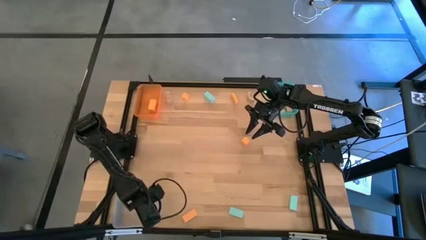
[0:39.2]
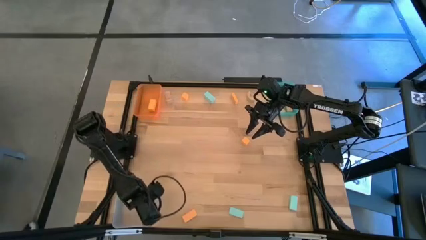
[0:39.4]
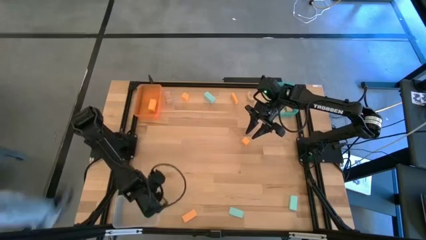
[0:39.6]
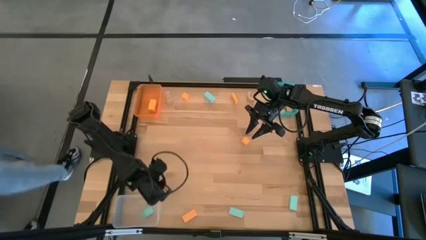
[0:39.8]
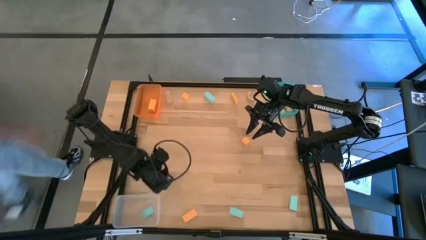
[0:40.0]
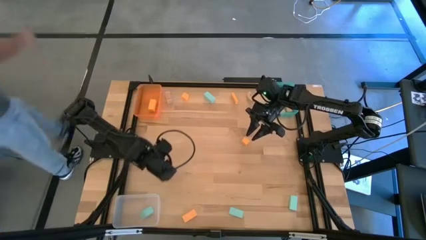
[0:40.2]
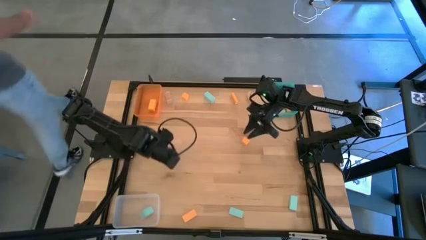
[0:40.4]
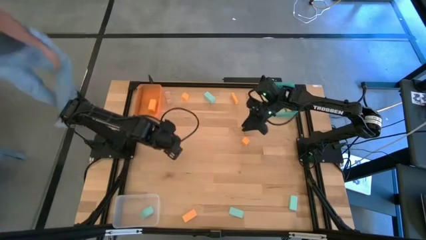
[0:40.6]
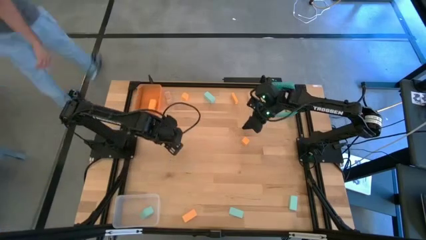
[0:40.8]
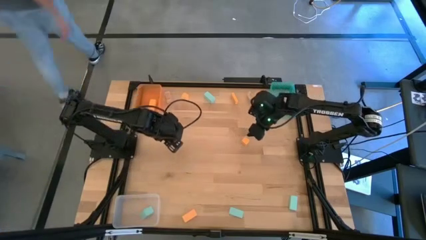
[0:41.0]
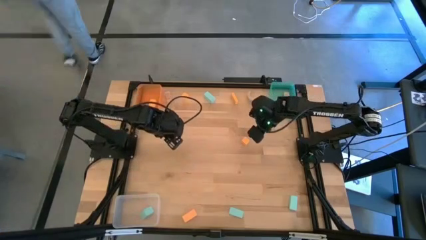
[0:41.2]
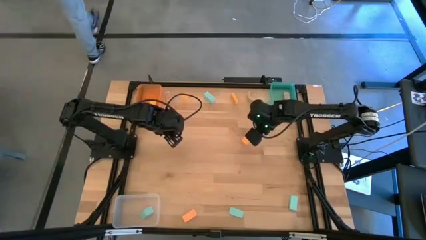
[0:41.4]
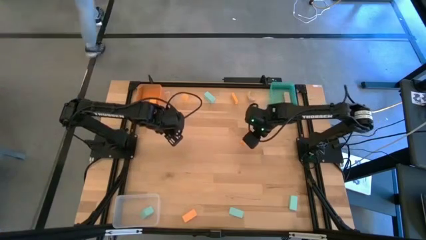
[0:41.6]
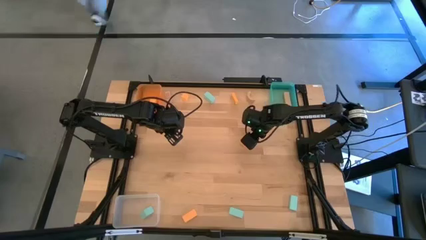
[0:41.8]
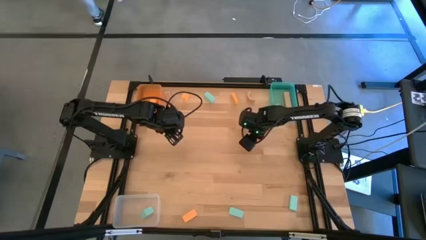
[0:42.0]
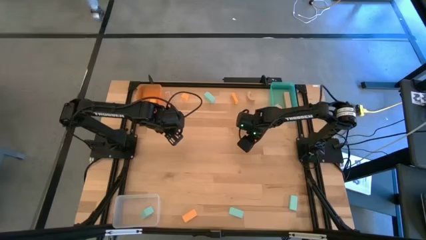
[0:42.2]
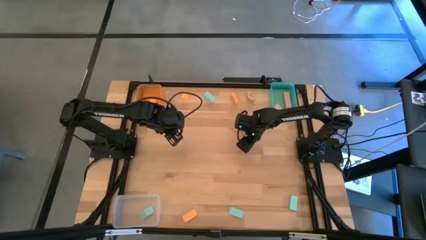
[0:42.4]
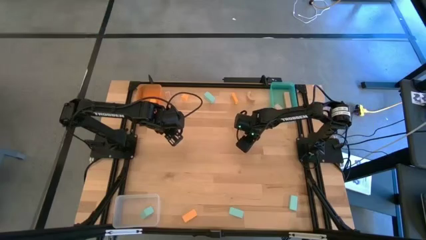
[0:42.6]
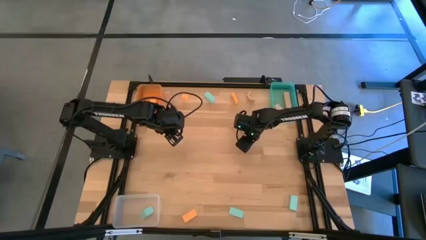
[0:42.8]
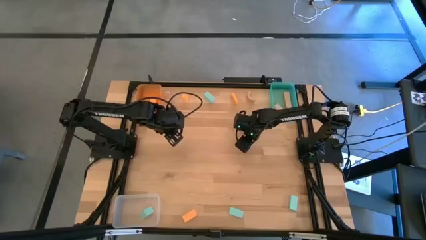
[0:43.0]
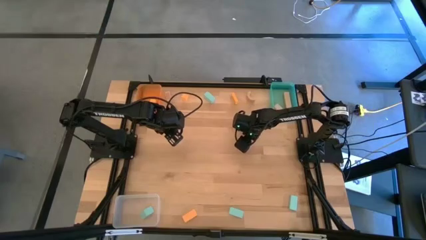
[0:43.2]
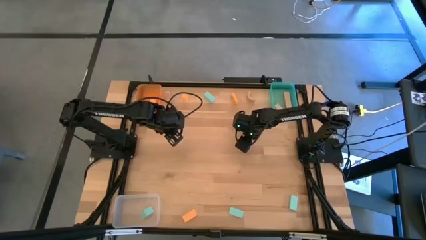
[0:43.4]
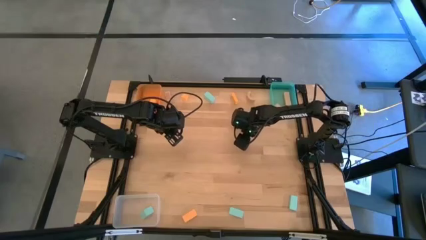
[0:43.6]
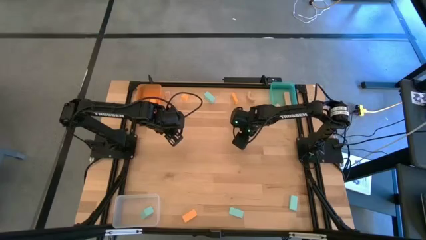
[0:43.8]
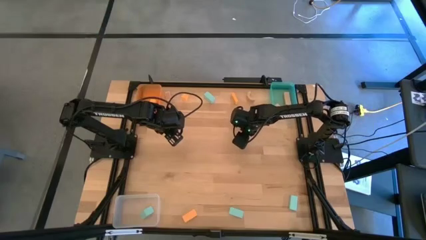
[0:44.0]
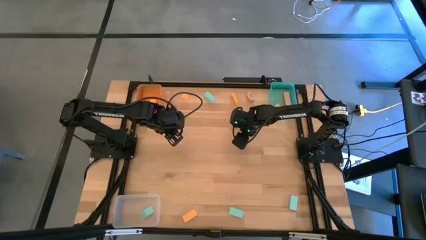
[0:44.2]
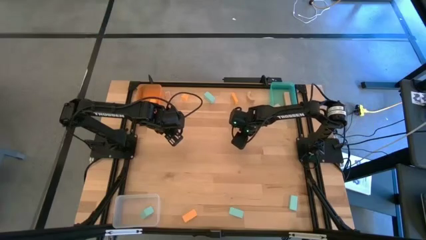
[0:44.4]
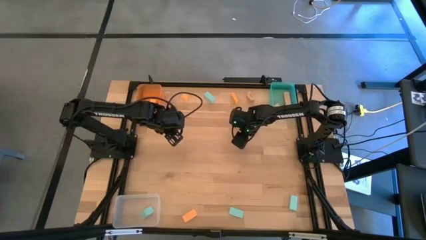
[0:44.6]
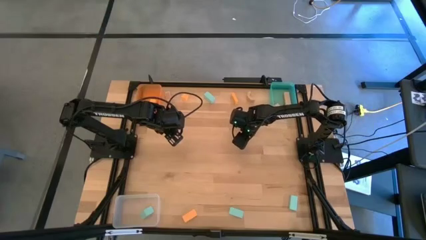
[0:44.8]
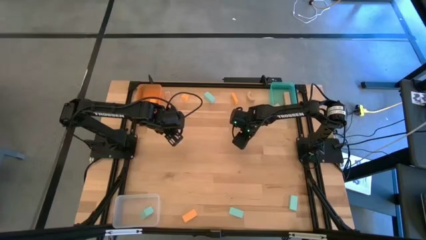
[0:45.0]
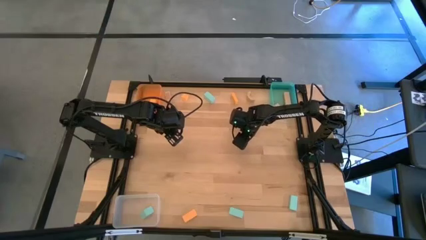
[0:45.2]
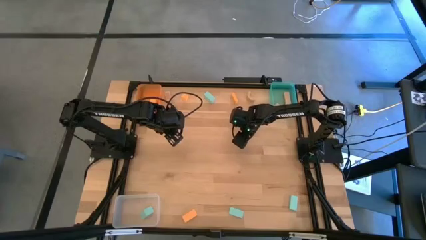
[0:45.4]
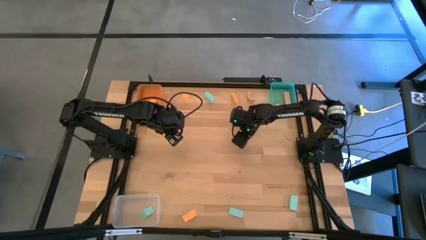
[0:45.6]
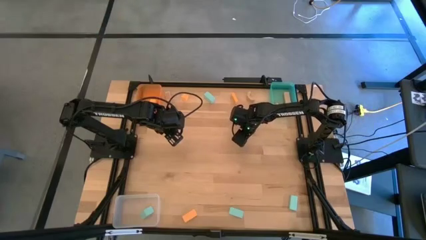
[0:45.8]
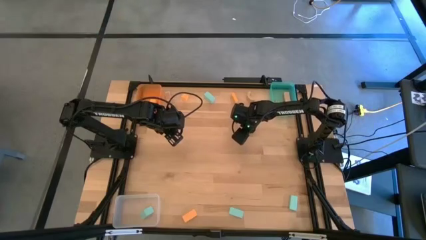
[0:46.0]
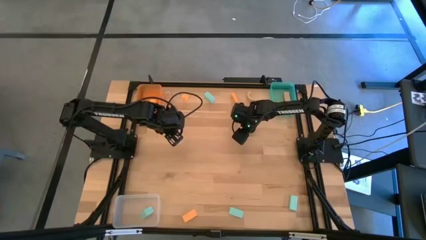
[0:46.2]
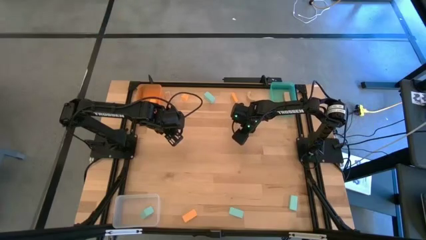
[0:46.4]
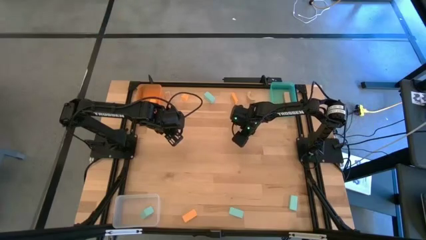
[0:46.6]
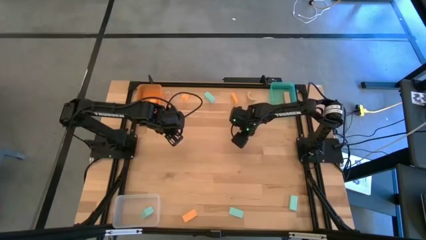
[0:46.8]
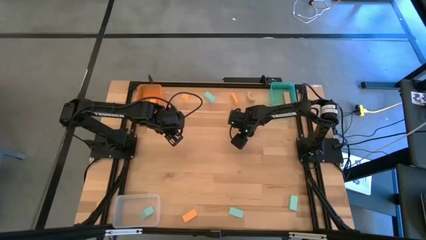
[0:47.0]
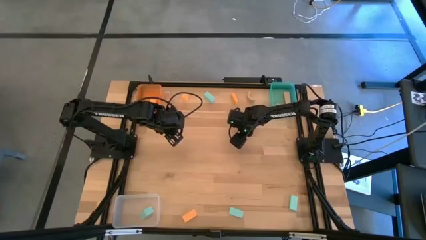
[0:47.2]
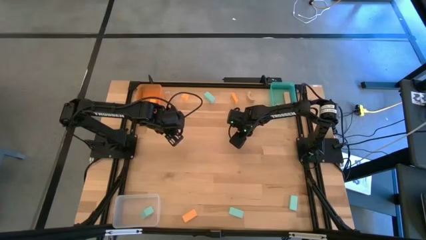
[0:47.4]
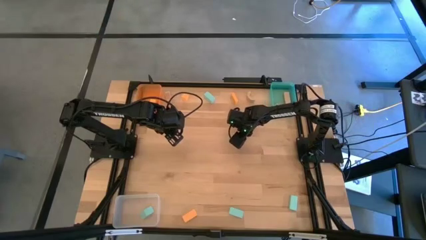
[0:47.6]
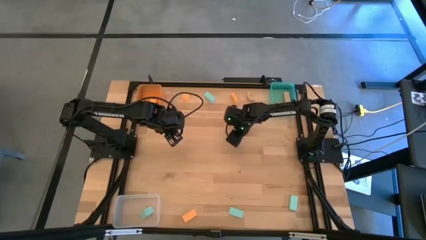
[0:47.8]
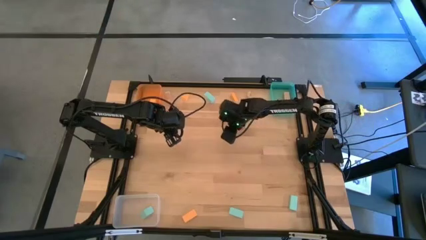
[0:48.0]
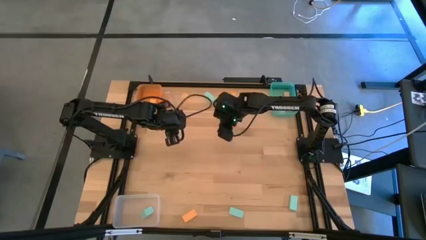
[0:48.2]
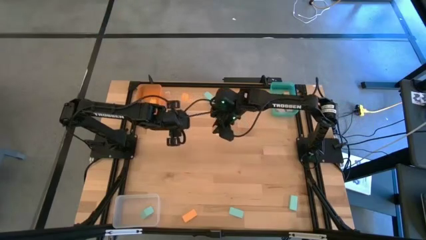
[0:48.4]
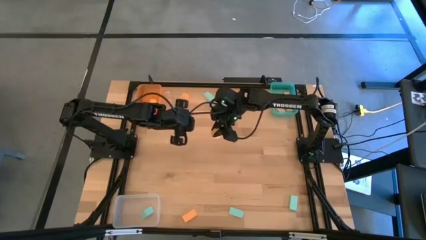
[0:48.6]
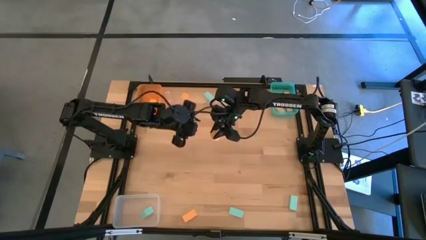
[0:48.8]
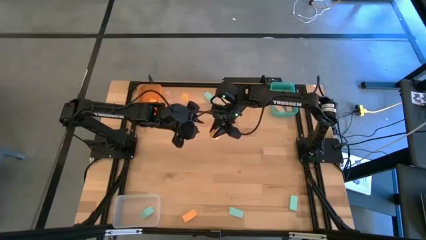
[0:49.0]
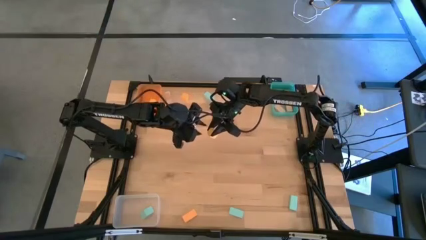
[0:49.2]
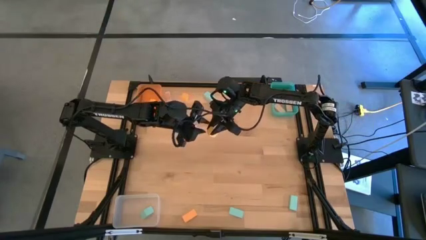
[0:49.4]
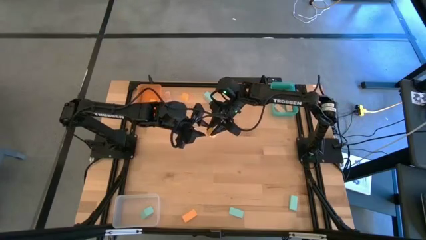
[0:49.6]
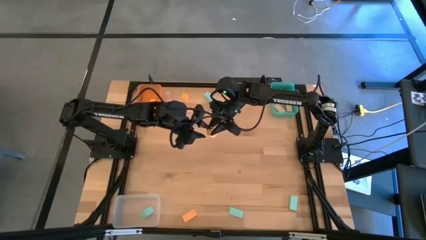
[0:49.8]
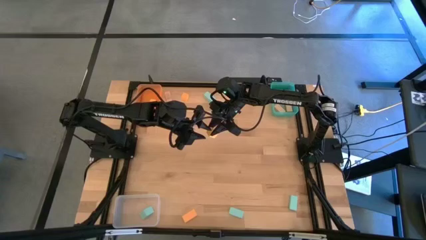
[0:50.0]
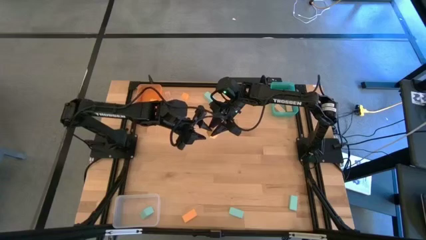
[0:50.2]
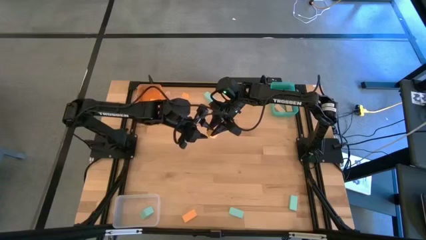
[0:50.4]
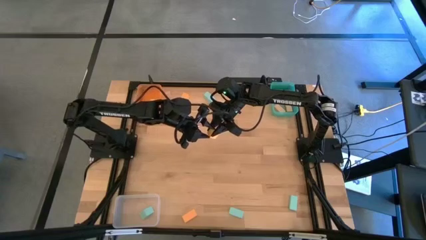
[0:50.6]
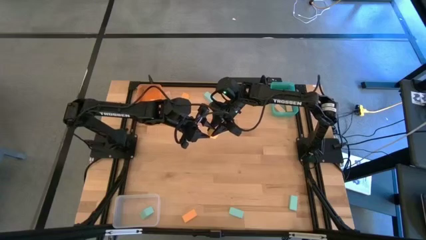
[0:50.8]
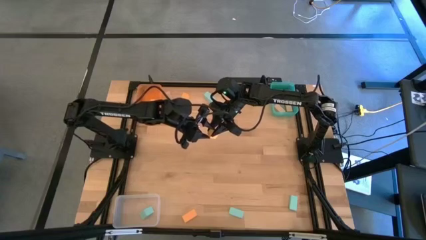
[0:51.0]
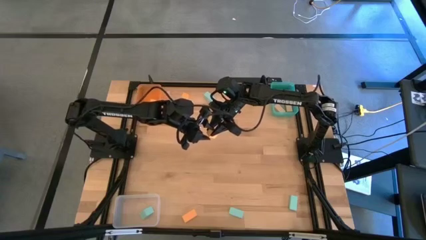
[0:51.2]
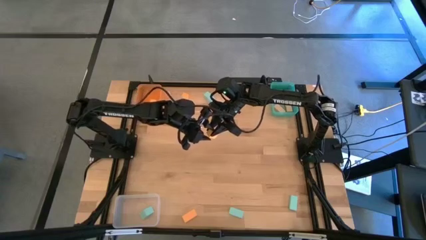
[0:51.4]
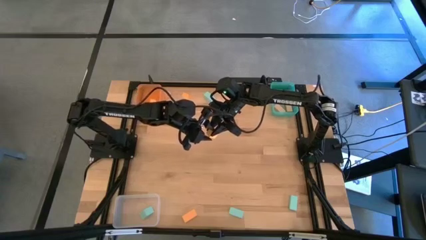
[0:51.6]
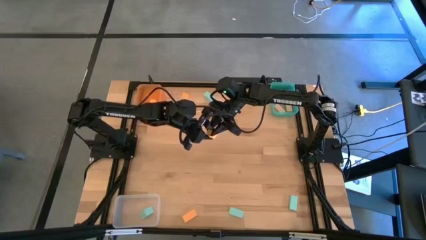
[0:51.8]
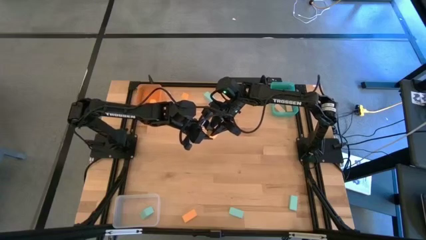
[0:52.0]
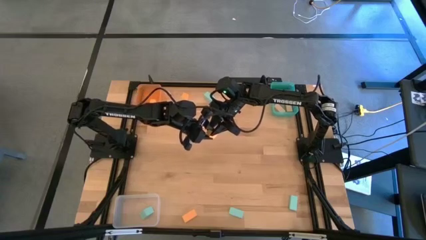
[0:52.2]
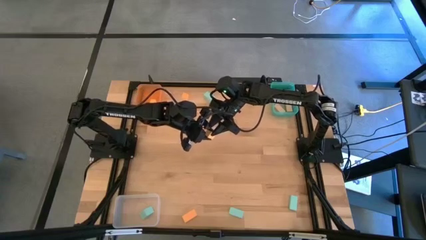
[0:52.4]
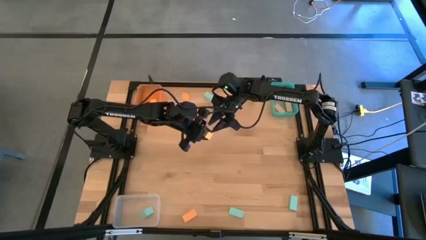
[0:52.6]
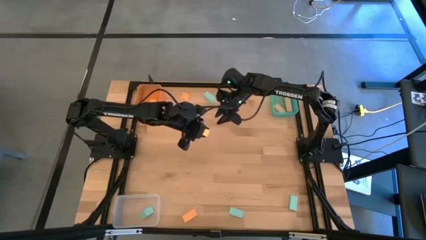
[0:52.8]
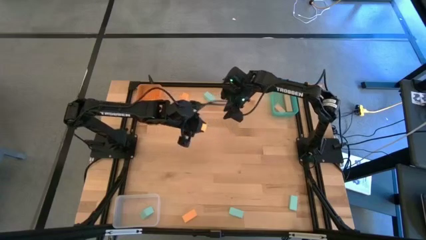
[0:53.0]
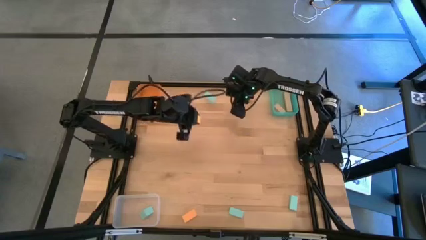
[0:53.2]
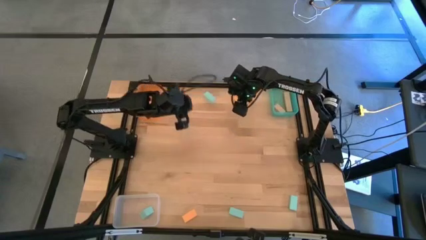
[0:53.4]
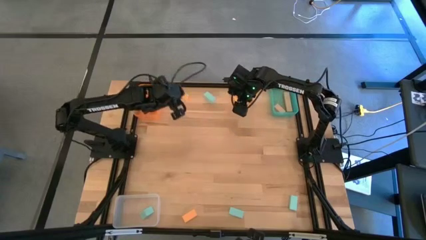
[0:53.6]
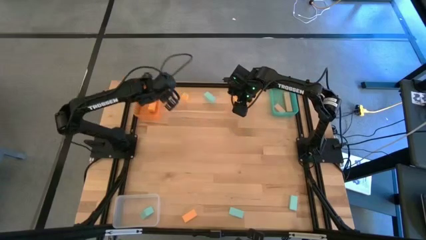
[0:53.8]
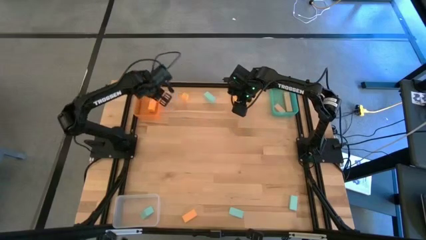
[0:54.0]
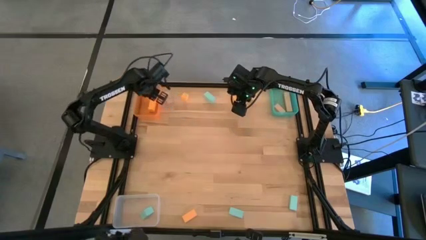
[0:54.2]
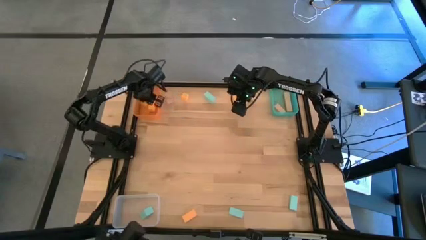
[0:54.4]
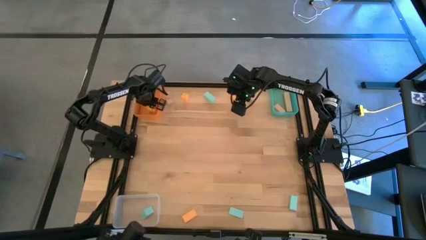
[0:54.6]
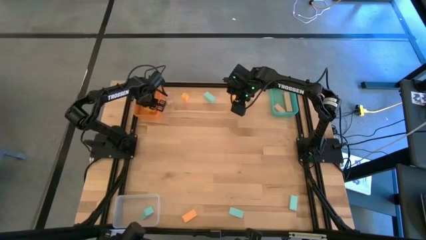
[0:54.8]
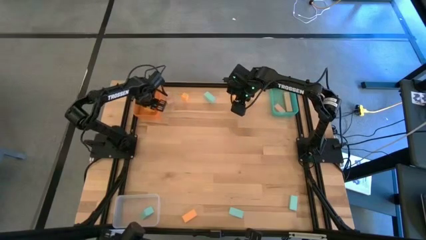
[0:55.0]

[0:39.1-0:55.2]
Task: Sort & place blocks by color
Put the orange block into the orange bin

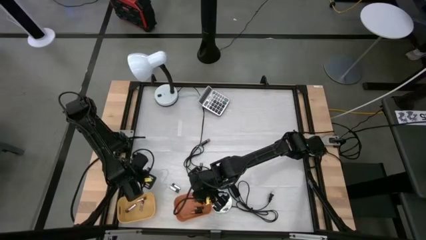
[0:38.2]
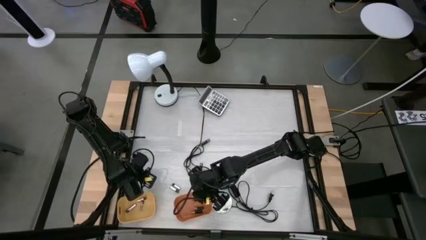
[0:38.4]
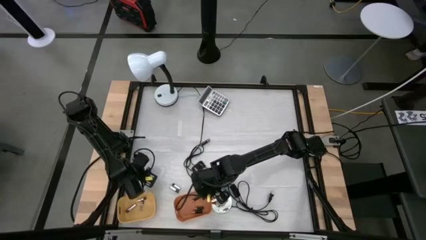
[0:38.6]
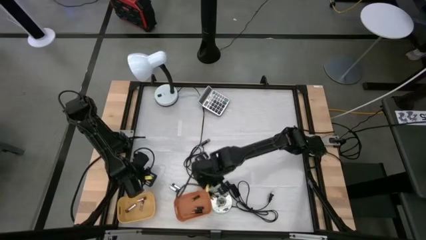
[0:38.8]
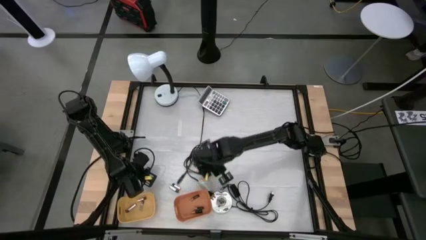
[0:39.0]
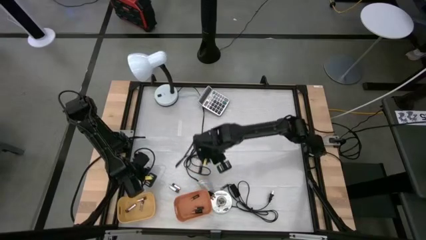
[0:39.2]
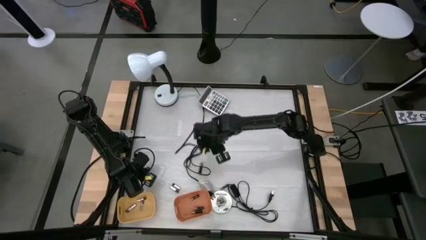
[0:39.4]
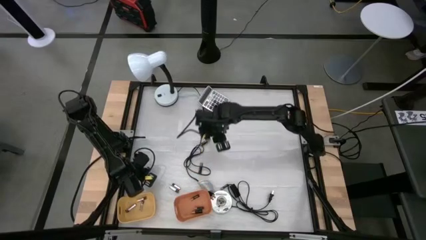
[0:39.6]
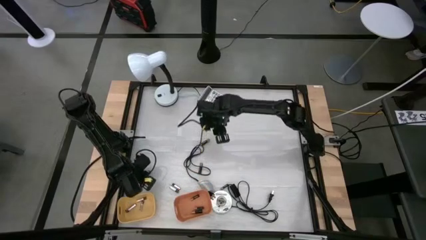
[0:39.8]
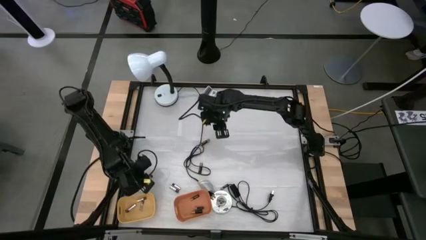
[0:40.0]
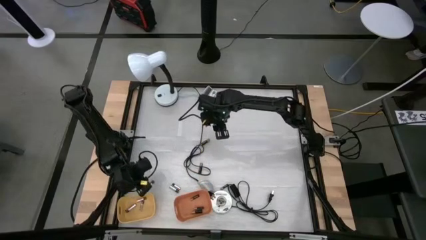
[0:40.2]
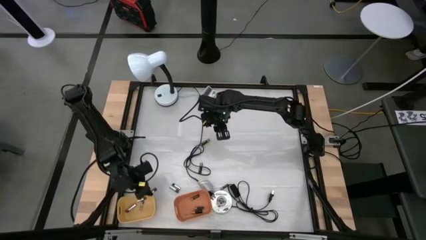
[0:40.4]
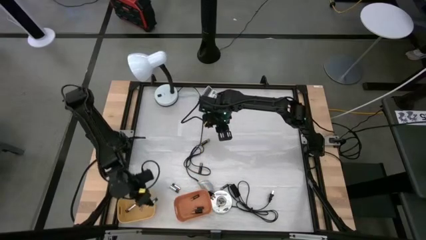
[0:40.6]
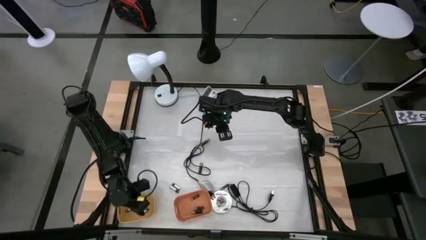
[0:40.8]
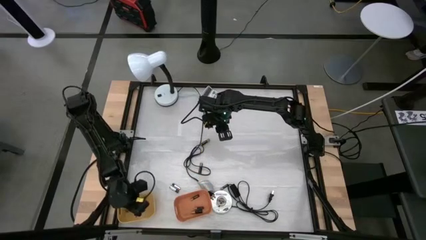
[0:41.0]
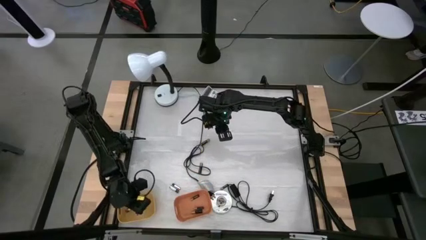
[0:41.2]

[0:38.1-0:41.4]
Task: Sort batteries
Put the white battery into the yellow bin
